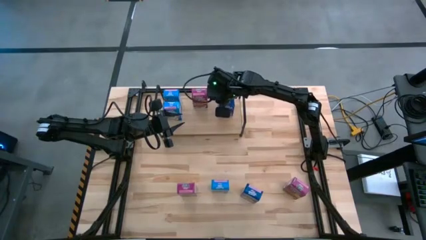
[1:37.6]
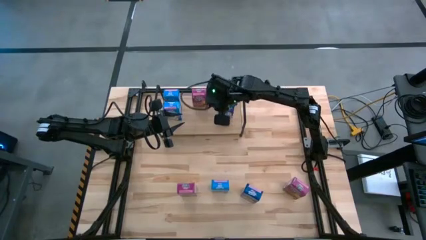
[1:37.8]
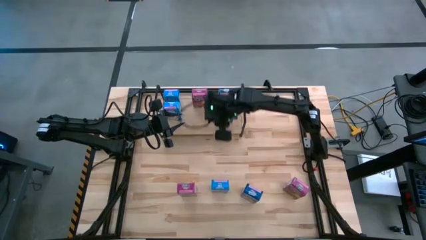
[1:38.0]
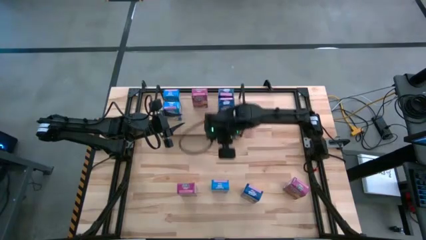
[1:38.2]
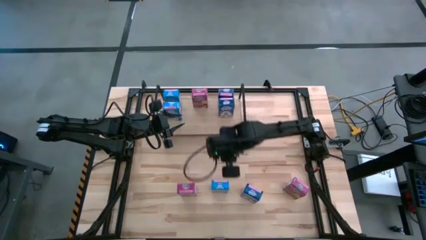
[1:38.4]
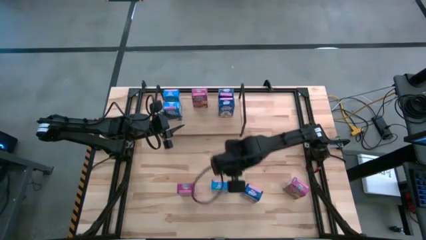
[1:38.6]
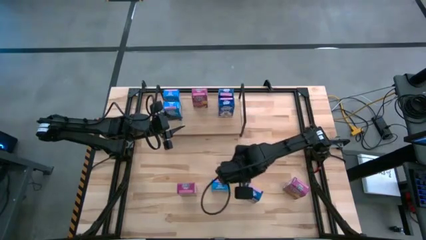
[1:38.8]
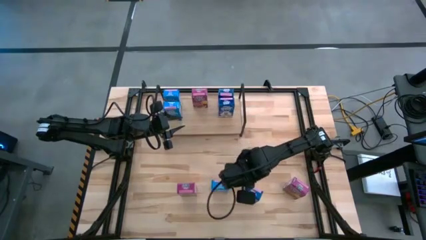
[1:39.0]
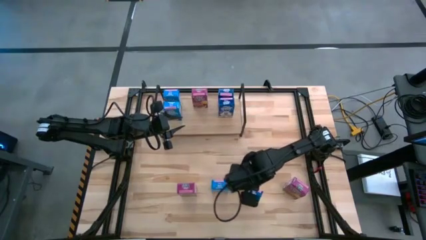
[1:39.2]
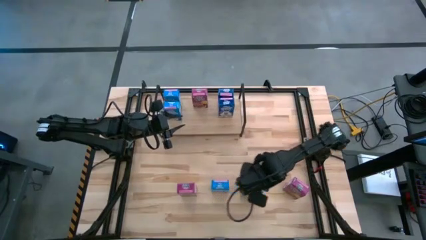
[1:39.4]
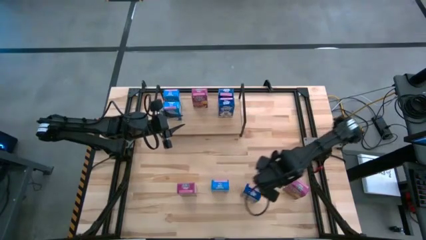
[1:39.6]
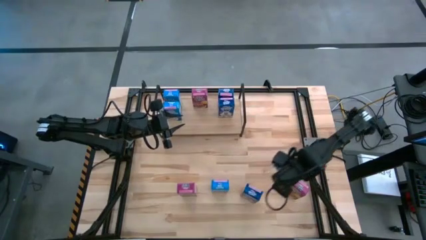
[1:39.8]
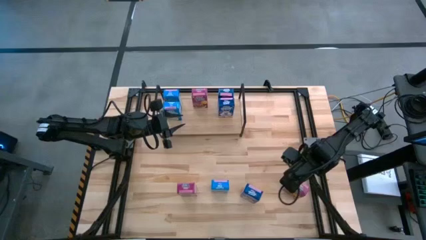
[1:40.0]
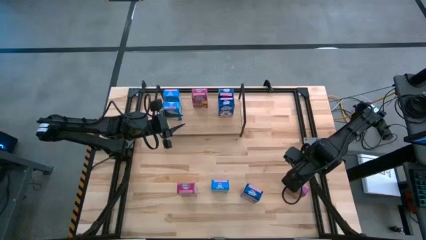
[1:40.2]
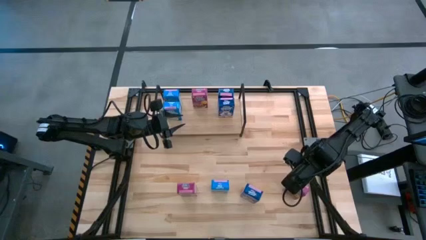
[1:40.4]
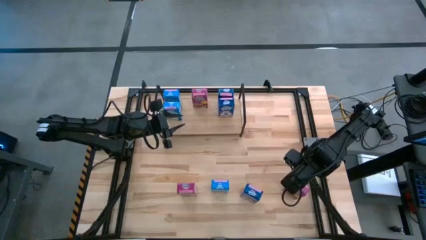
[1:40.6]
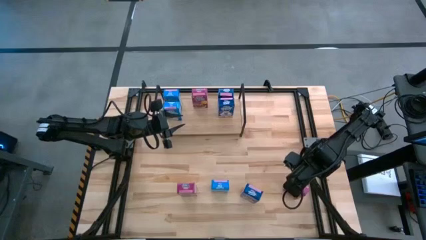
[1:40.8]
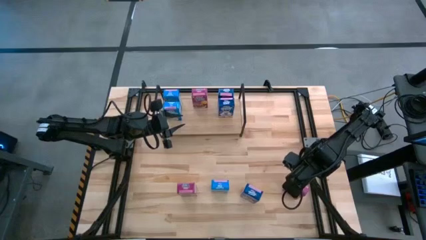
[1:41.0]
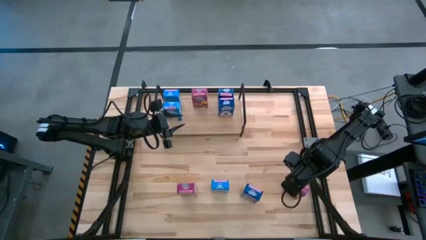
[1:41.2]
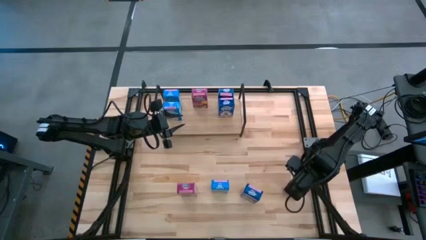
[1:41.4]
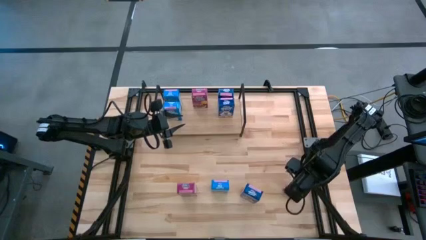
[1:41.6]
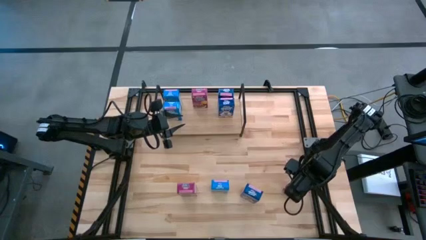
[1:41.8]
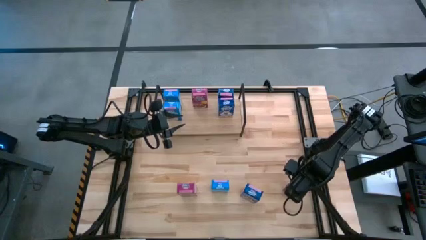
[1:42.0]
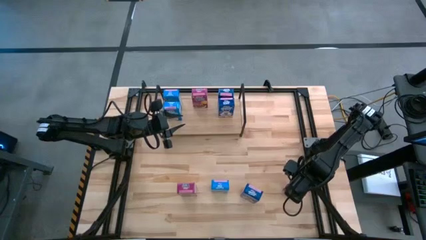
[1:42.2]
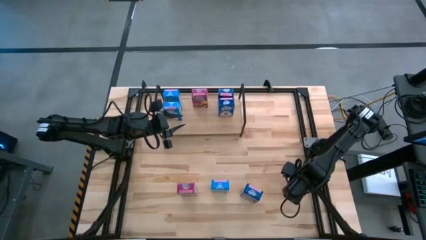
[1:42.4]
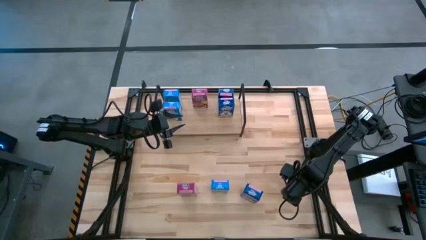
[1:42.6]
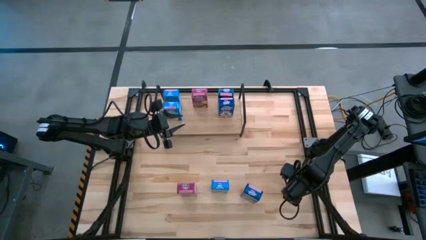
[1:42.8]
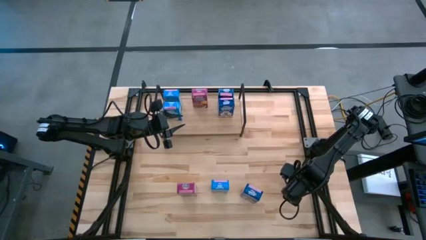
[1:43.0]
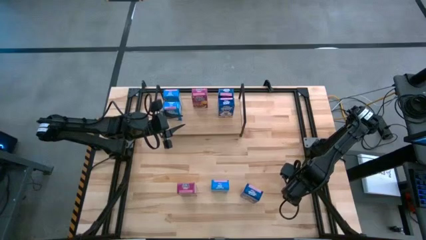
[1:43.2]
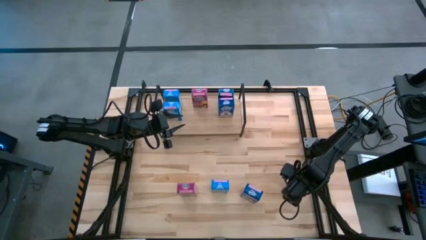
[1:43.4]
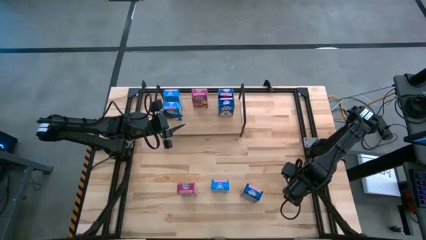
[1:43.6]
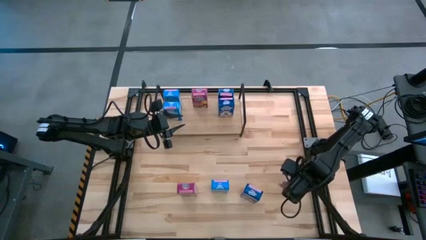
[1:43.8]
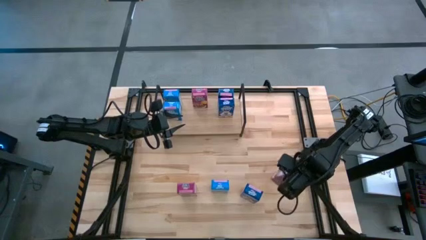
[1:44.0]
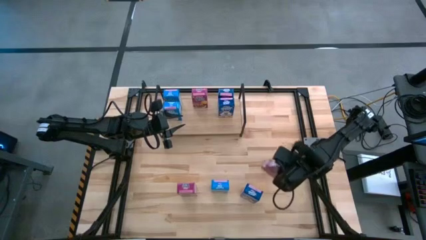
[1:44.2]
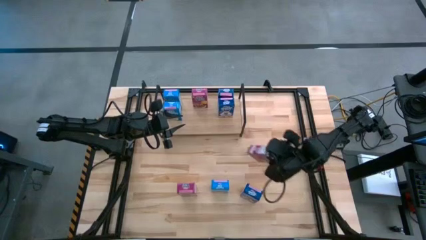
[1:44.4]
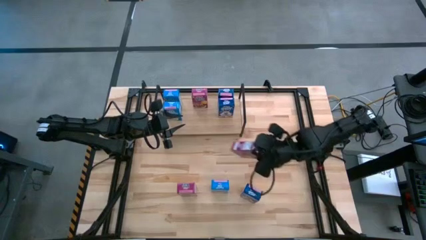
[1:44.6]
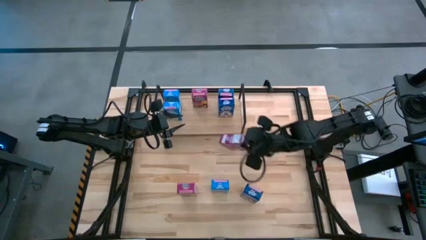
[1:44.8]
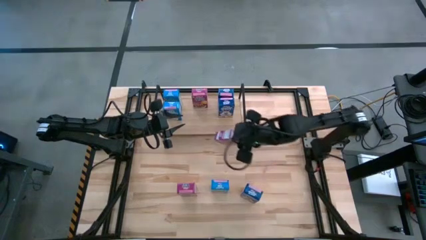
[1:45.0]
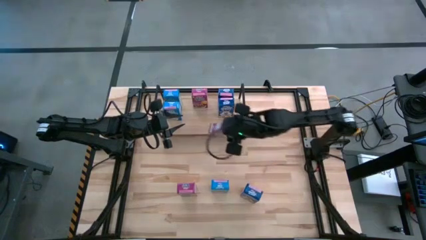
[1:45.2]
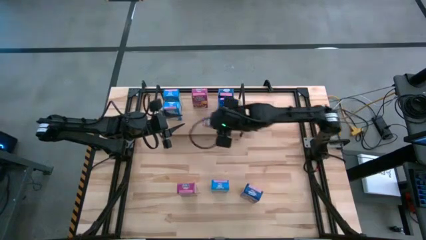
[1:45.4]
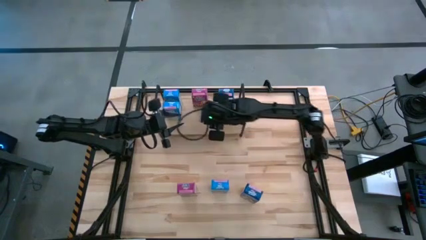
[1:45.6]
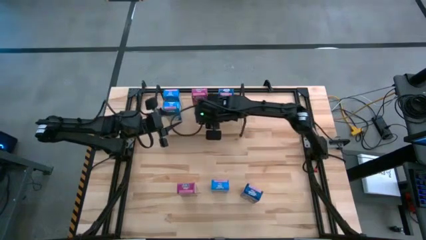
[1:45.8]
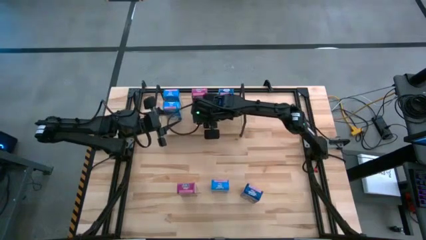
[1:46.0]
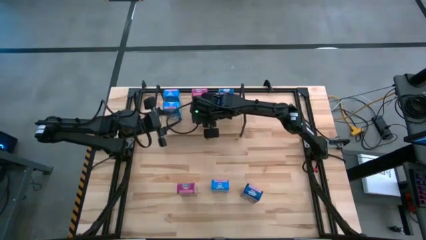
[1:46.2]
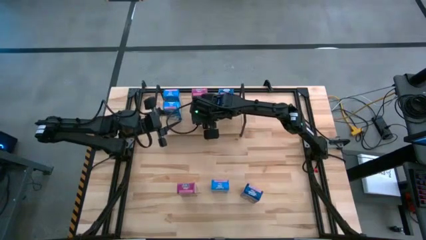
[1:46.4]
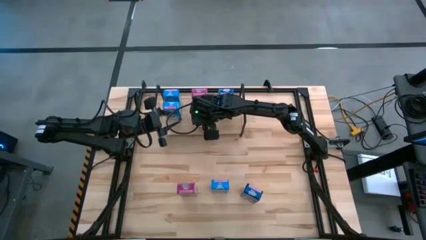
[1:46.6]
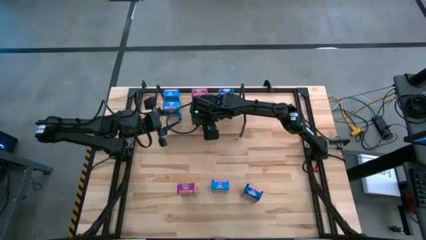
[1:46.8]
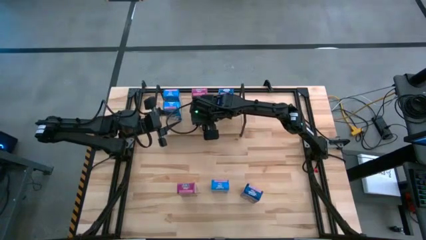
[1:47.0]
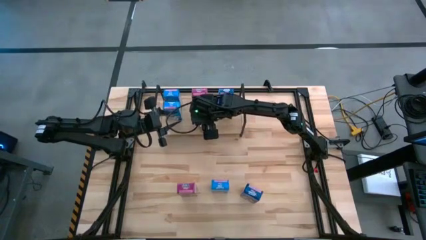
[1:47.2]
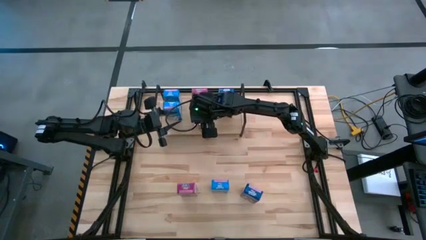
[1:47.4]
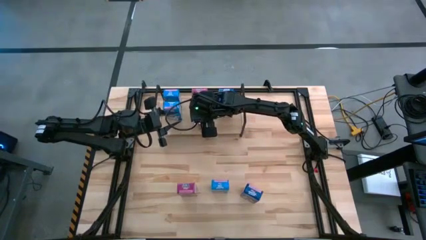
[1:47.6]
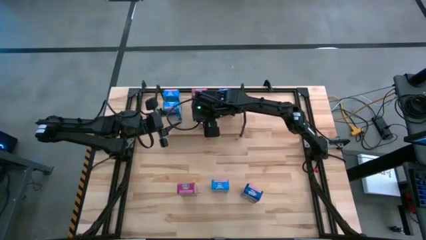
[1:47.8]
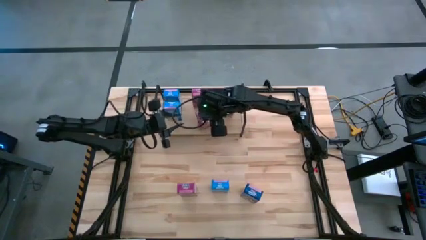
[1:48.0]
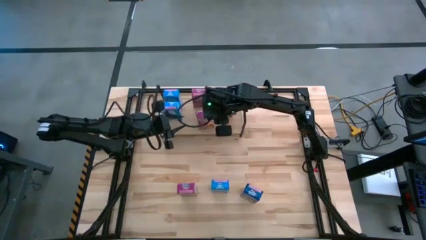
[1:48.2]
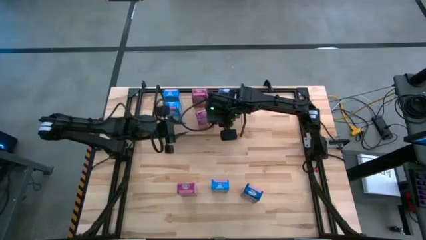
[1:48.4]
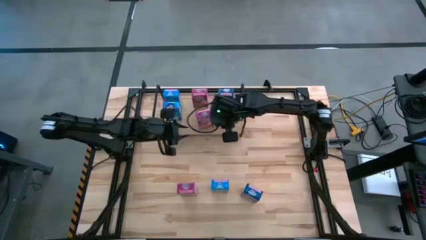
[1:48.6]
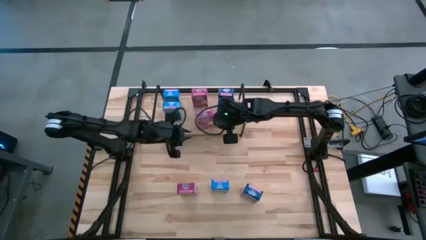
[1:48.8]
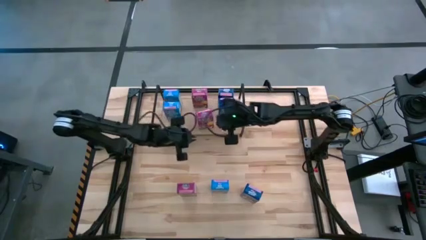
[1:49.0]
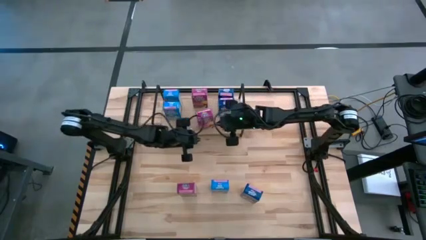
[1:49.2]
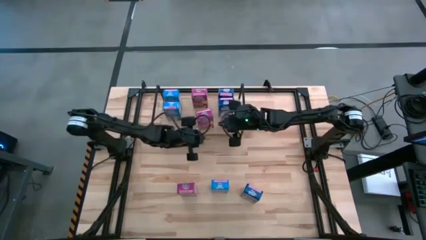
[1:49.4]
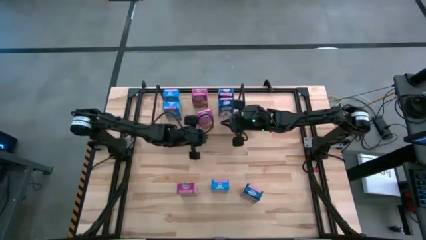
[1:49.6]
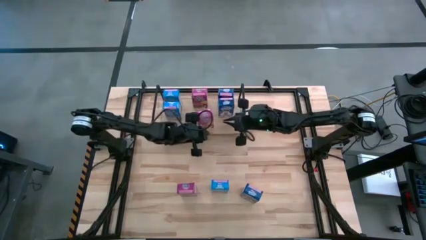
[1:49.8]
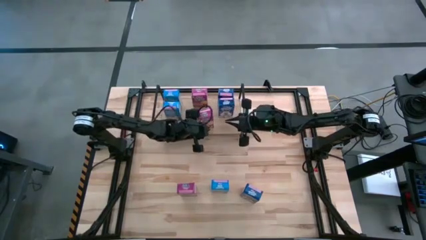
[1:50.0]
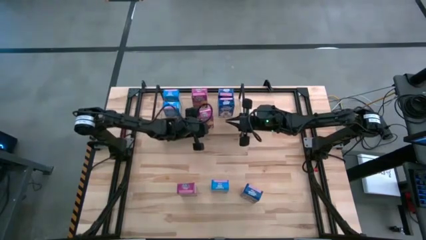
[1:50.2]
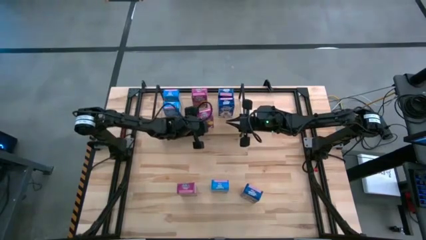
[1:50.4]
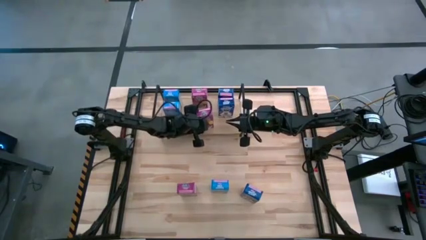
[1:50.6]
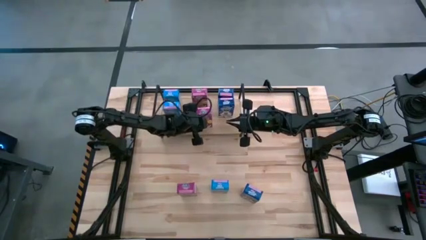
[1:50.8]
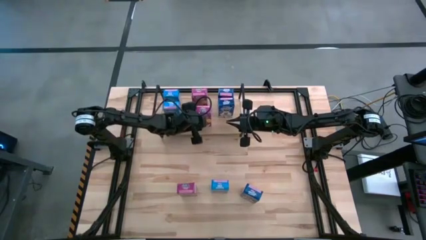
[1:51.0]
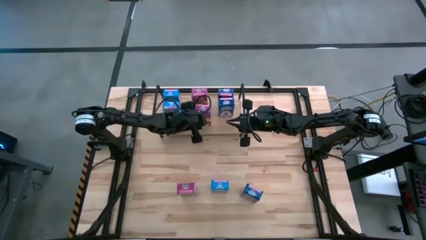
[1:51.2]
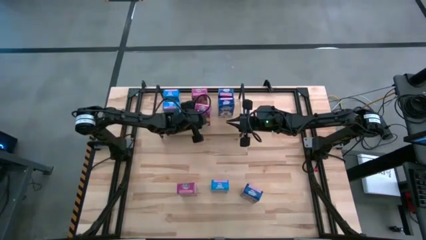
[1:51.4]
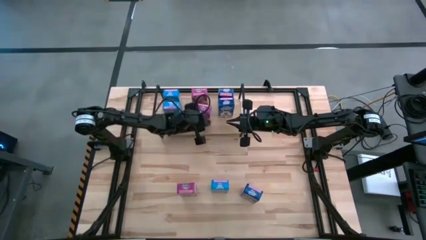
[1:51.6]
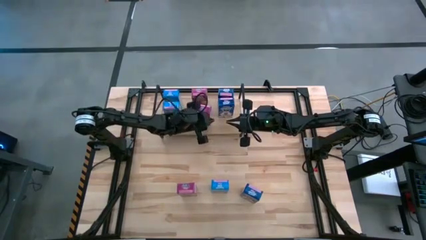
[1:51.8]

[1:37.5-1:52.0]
Task: Stack cereal on shelf
Put the right violet cereal box on the shelf aligned with the violet cereal box

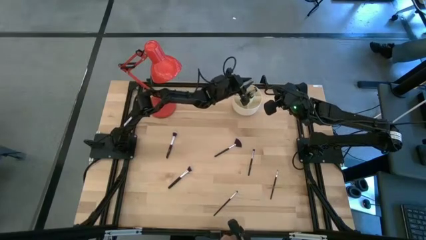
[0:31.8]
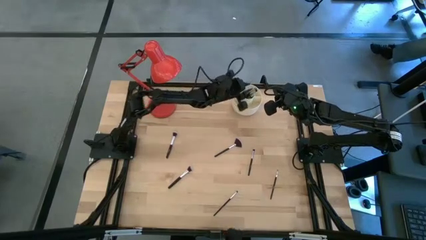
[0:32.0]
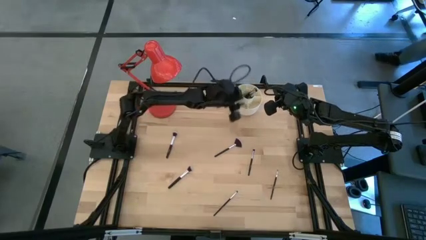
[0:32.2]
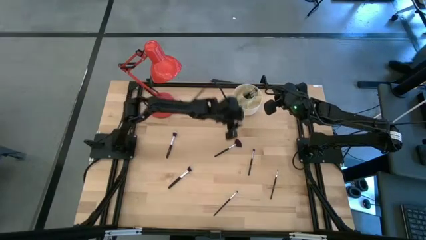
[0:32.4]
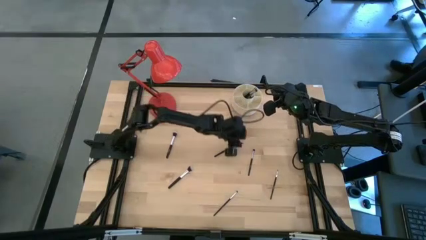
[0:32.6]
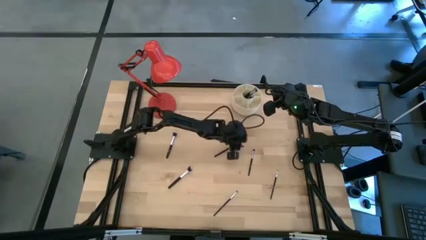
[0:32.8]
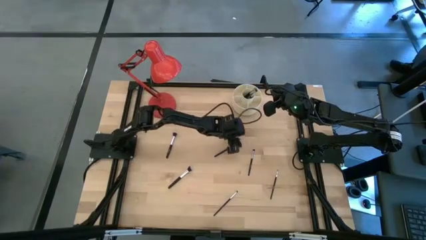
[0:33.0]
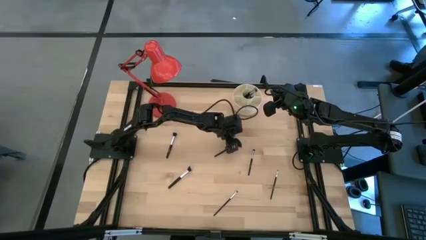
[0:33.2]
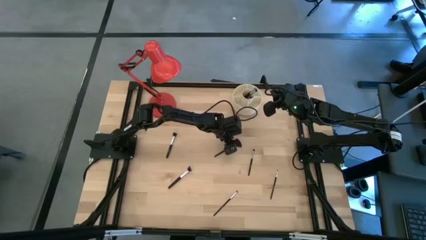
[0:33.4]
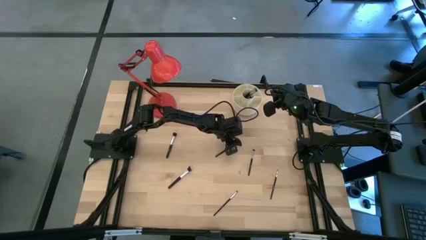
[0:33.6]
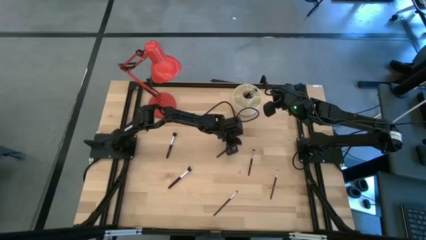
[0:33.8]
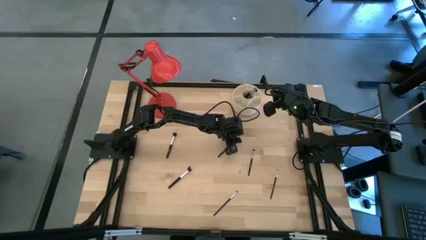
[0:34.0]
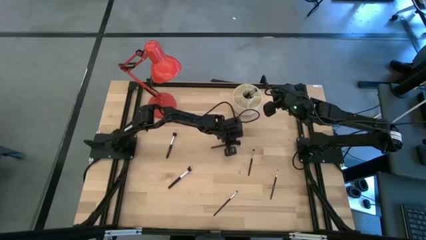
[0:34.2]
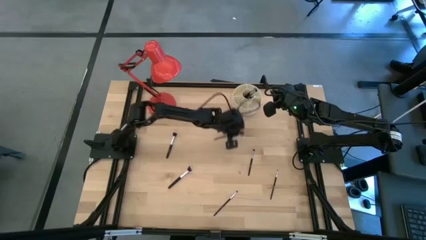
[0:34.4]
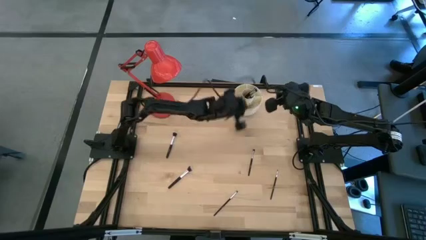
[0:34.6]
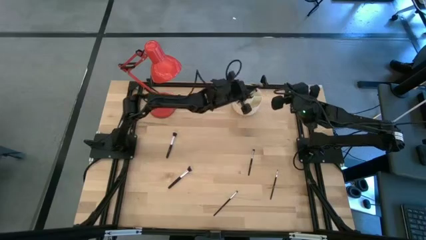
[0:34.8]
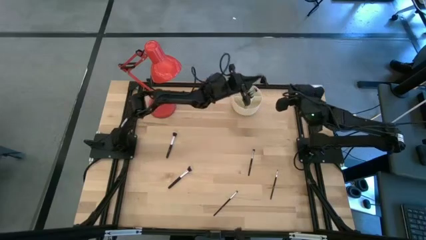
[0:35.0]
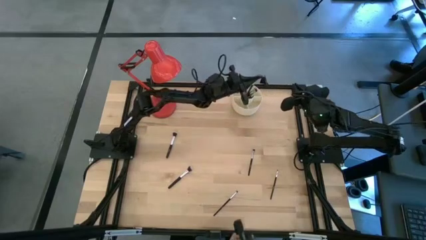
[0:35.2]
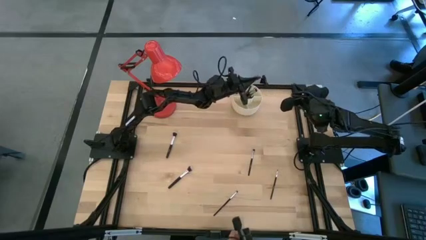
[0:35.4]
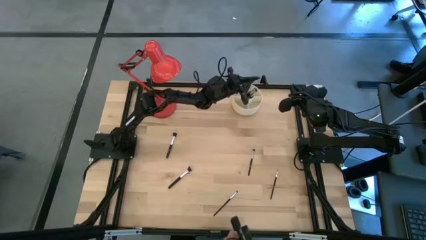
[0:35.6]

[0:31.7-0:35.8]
Task: Put items in baskets/containers
Put the black highlighter brush into the white organizer
